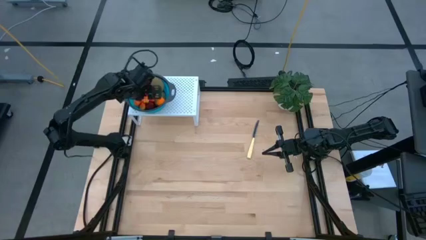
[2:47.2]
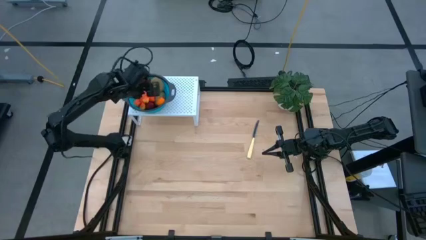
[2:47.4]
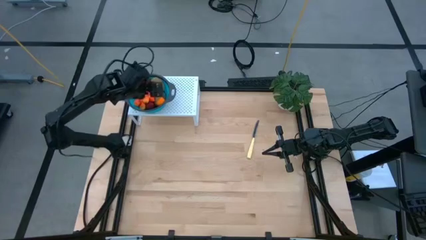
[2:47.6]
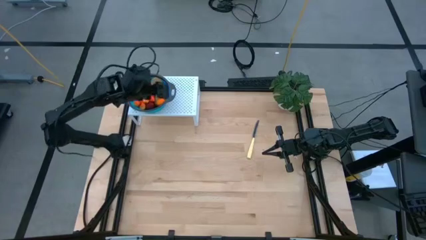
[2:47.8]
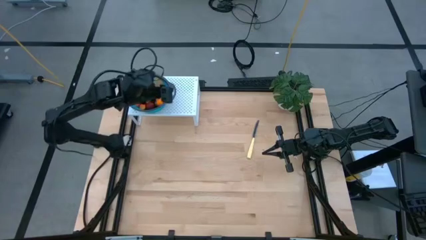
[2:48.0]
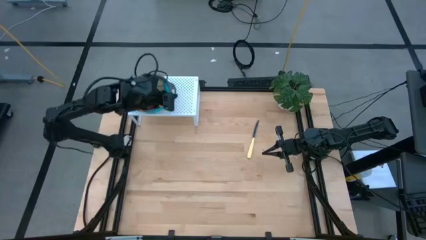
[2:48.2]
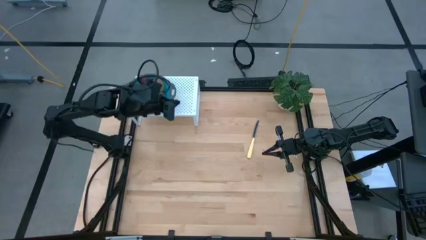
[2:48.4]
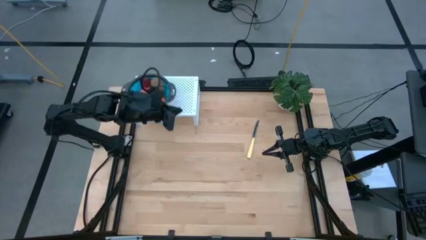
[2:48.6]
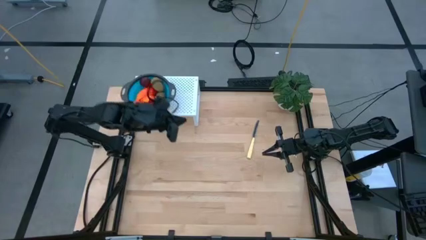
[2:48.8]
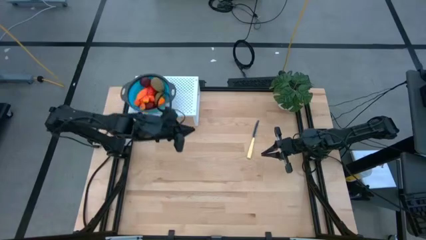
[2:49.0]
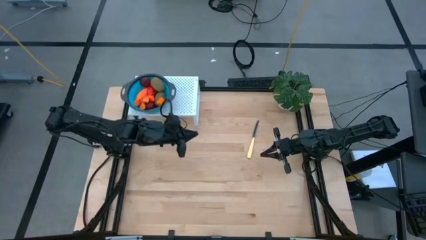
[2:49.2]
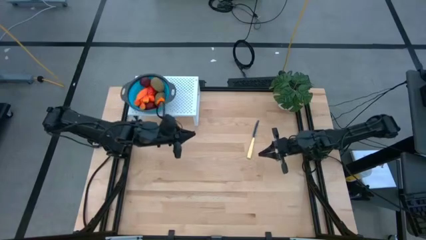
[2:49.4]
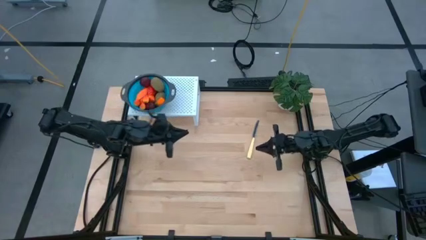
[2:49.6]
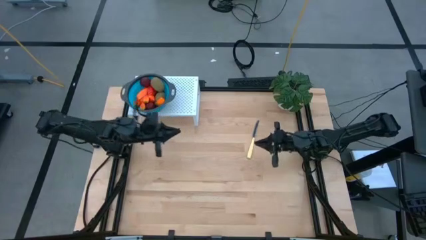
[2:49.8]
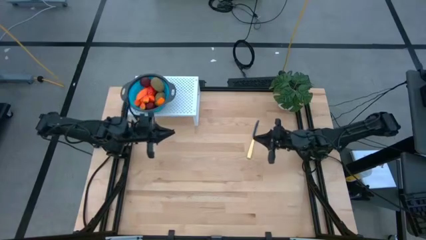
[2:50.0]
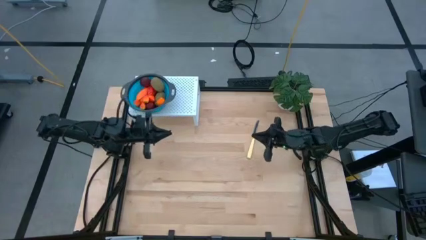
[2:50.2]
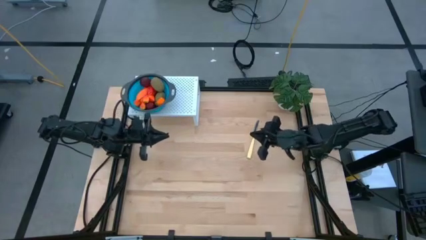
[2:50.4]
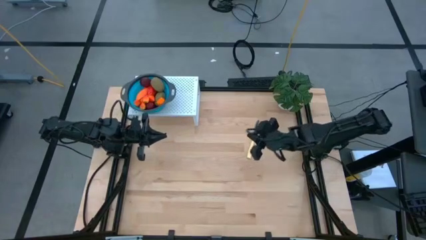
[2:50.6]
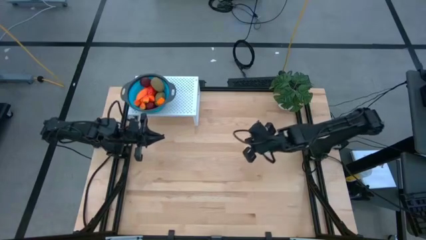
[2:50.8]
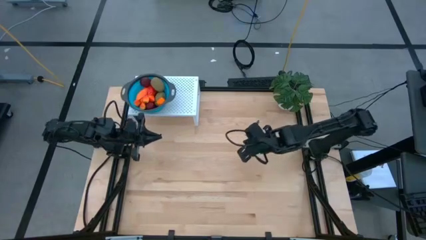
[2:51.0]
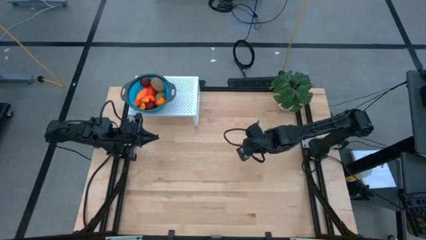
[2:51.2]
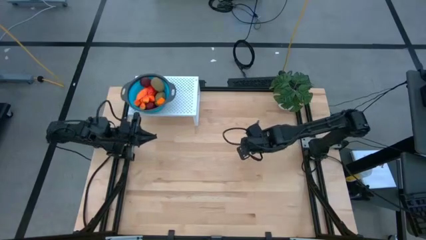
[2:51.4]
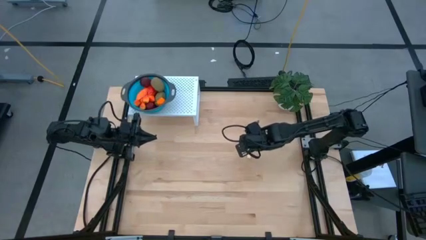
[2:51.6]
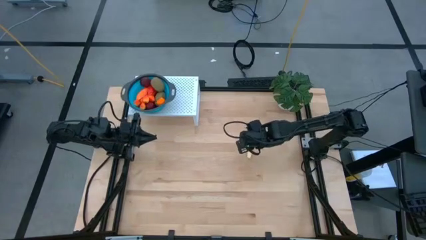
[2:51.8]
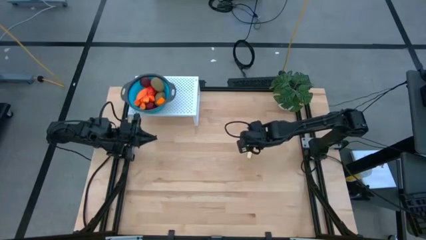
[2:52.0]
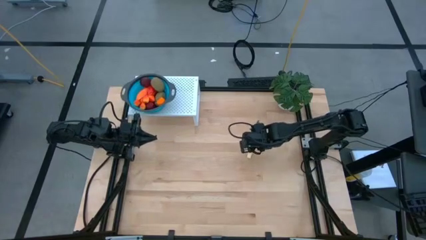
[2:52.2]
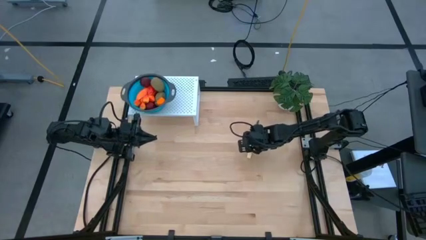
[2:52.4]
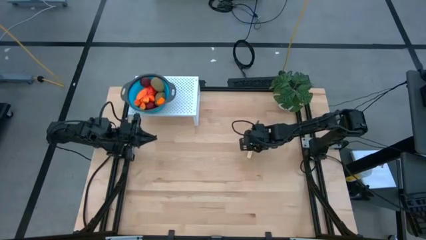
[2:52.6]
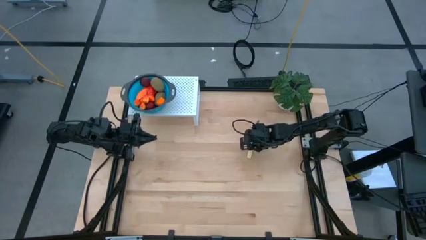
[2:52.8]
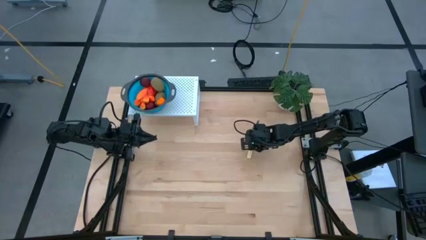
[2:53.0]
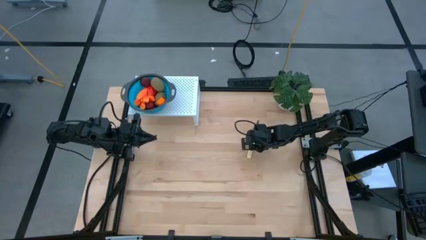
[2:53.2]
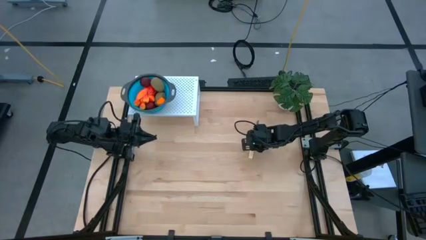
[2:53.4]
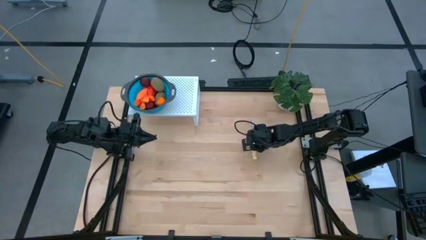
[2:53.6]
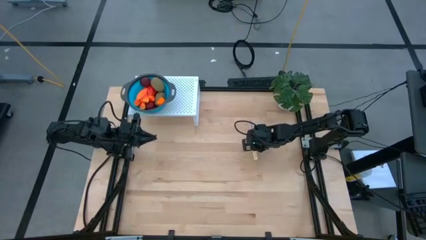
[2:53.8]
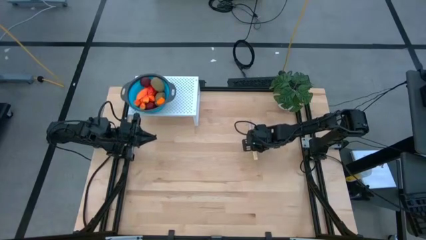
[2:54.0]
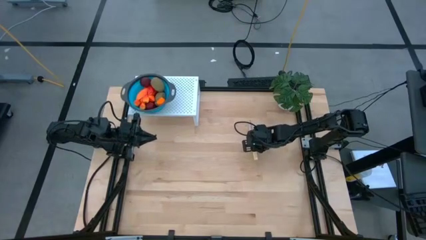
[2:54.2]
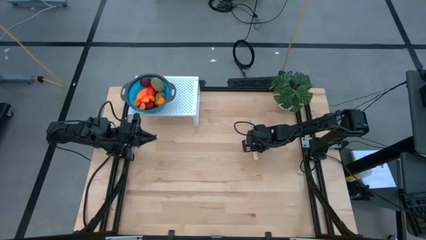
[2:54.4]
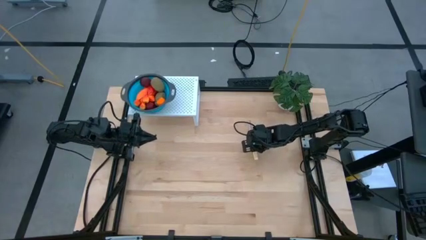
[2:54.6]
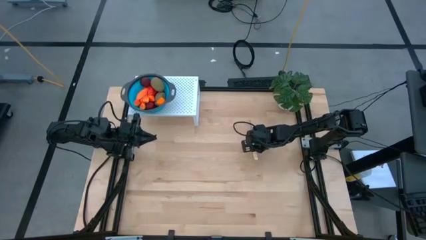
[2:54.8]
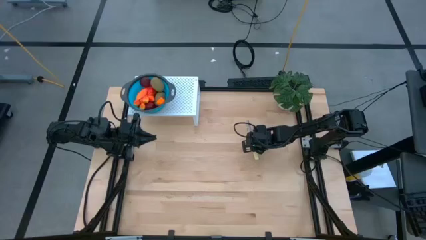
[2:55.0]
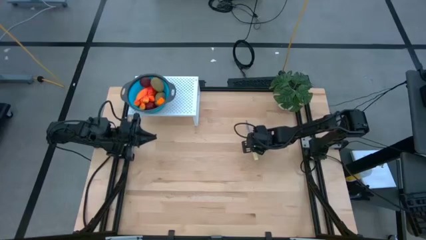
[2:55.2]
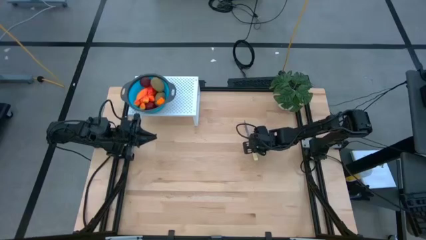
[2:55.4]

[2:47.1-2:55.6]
Task: Pick & Place Fruit
Put the yellow knife on the shelf
